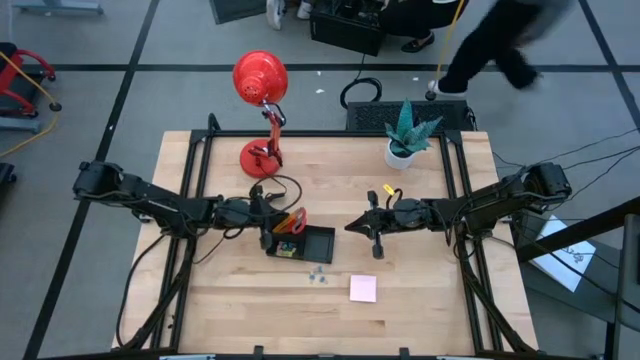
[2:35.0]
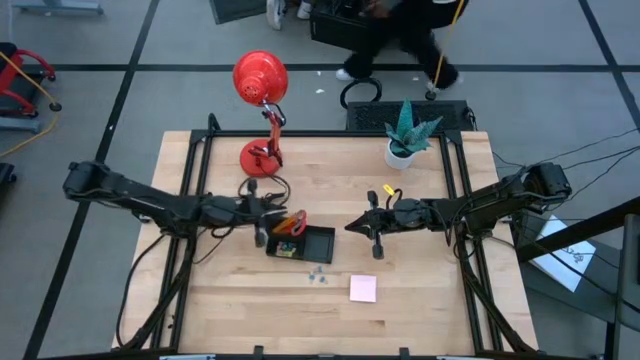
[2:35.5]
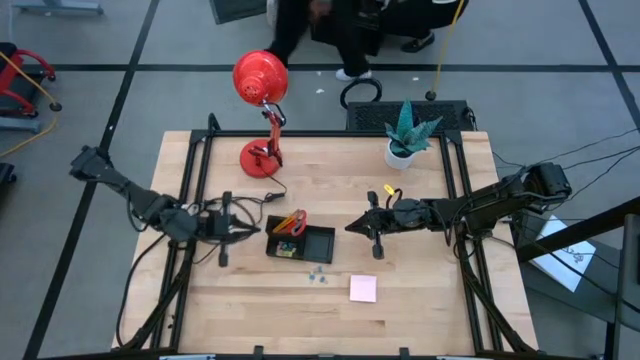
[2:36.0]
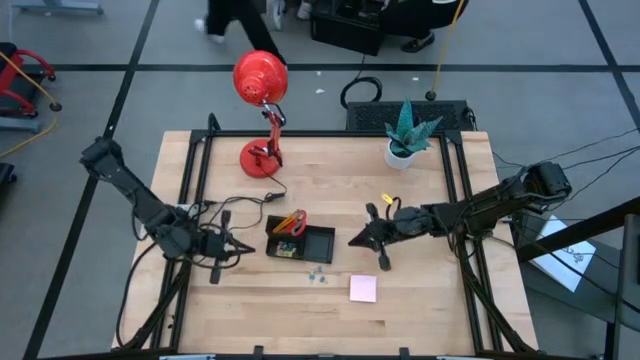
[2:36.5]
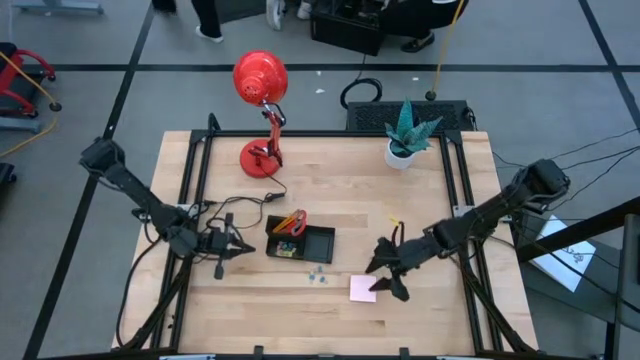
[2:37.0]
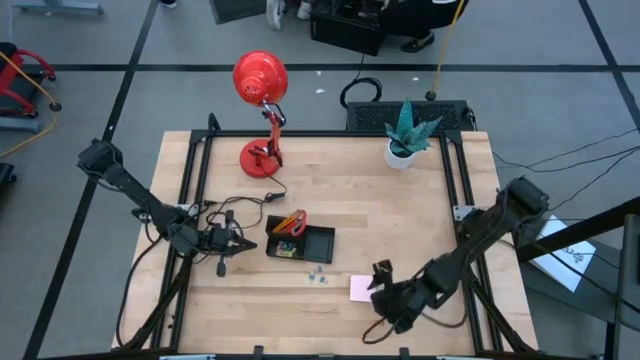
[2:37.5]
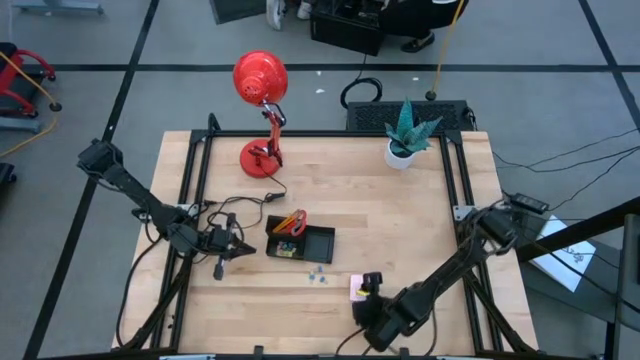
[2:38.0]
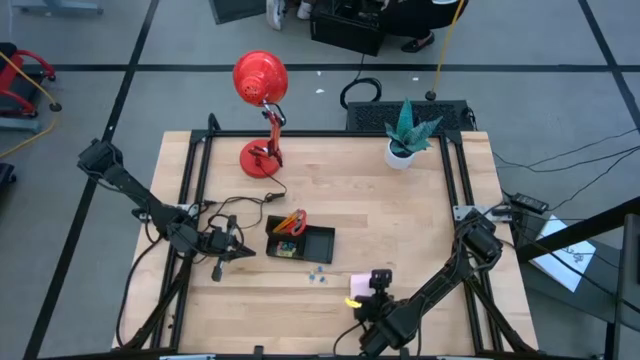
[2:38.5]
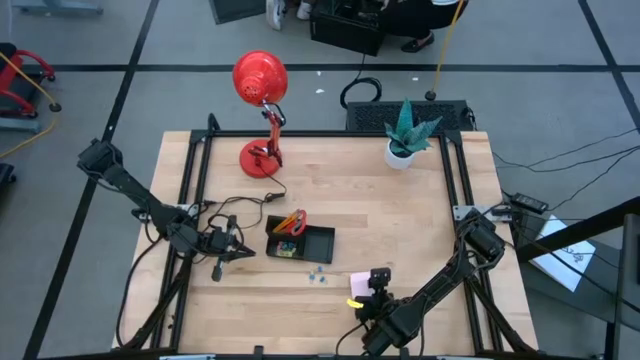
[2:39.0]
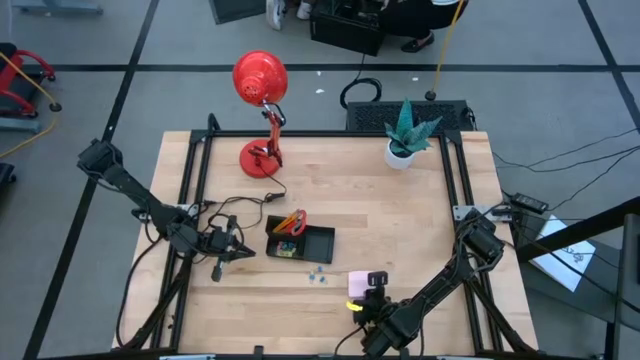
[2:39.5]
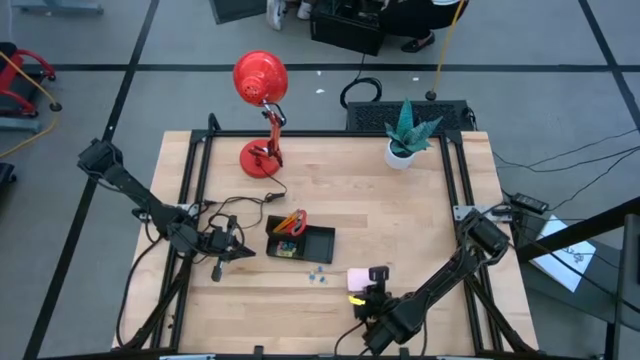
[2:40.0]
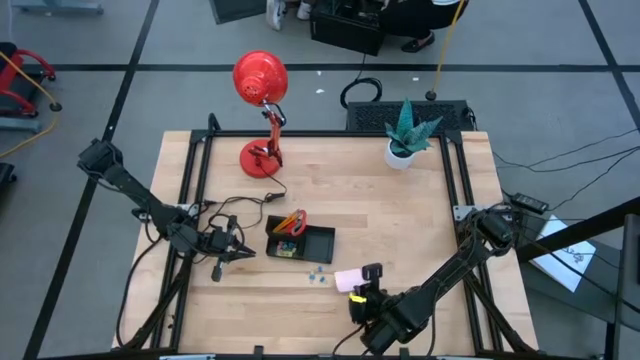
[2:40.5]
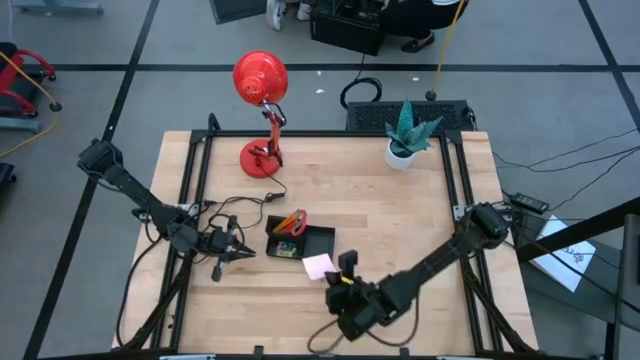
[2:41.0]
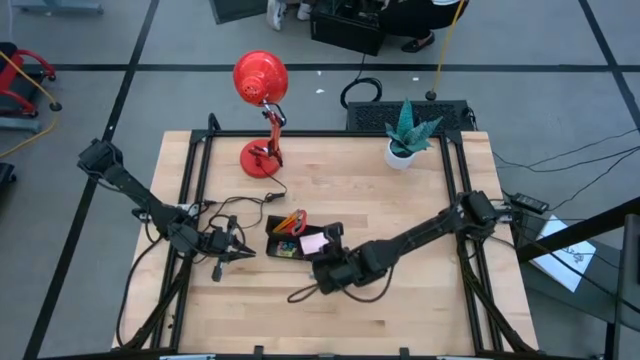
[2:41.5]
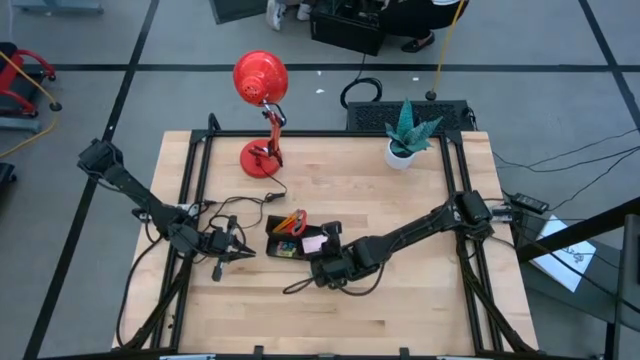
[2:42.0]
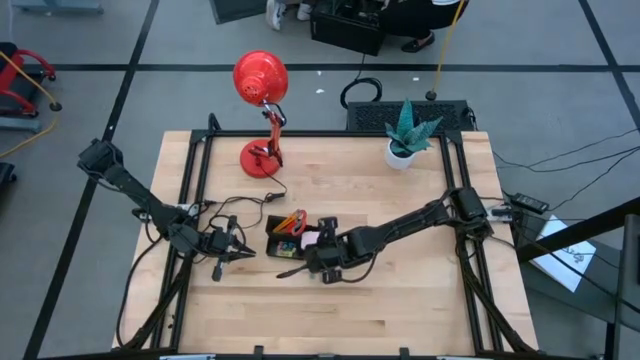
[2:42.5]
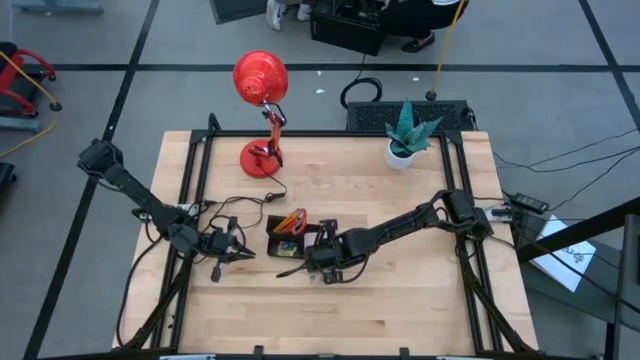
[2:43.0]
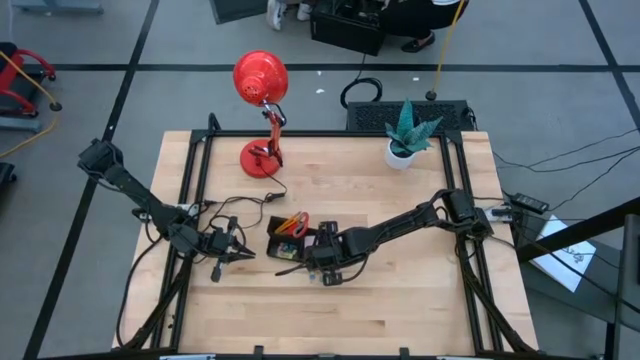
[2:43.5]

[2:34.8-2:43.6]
Task: Pick and place office supplies into organizer
Put the pink sticky note into the desk organizer

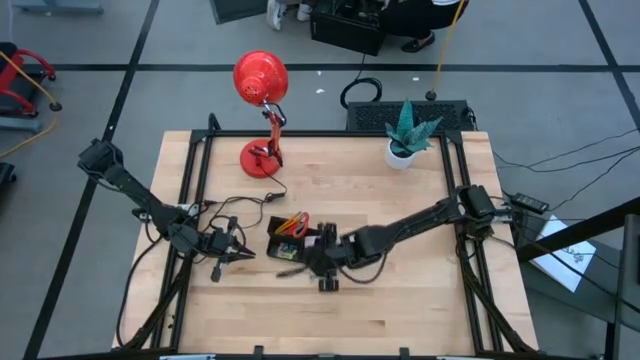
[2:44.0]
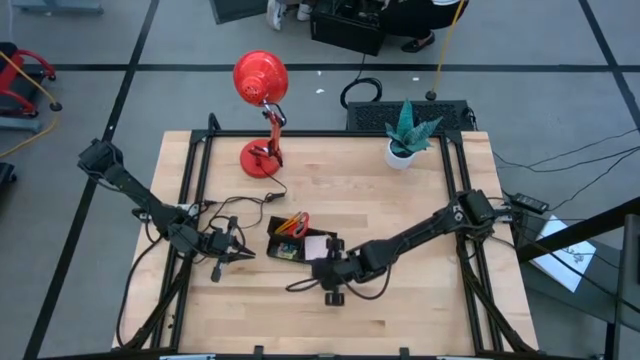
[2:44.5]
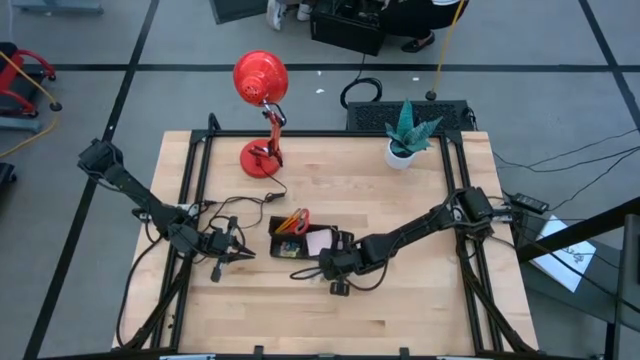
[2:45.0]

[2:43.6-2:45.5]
Adjust the desk organizer

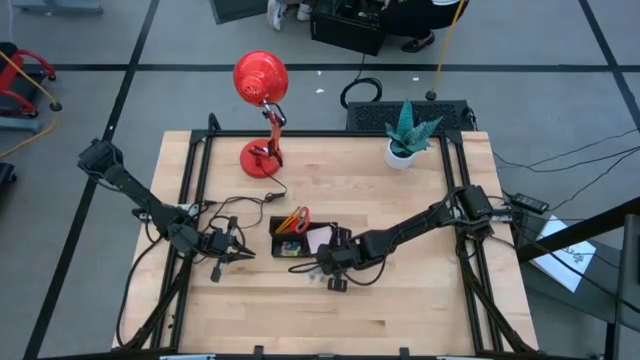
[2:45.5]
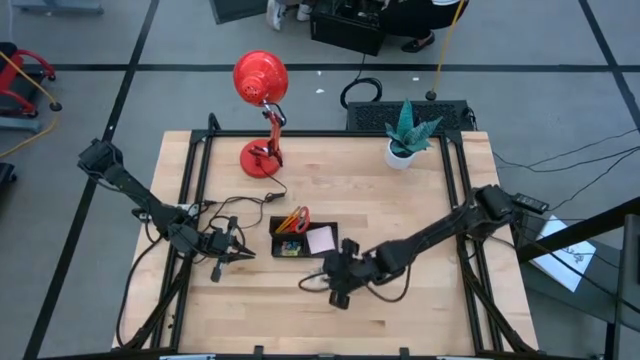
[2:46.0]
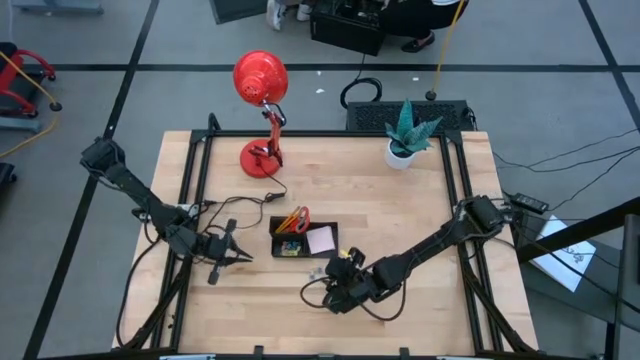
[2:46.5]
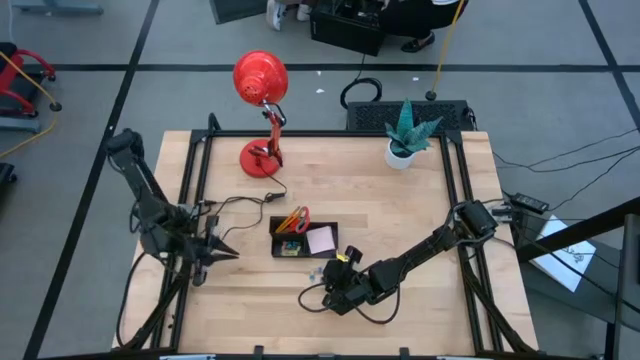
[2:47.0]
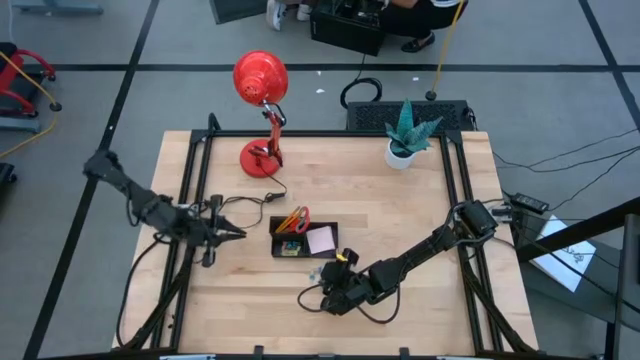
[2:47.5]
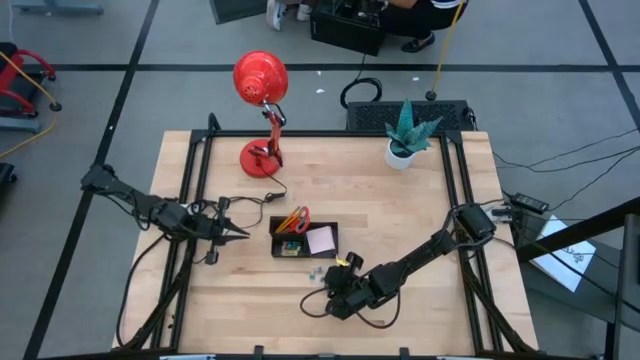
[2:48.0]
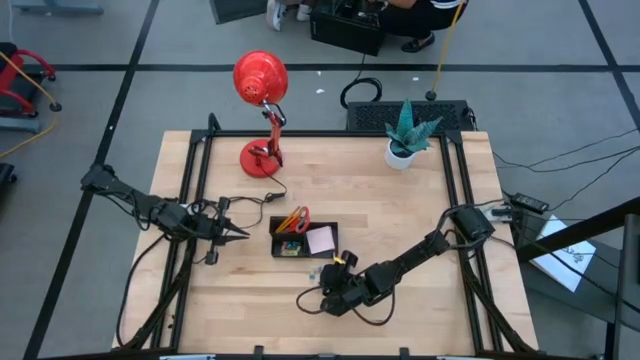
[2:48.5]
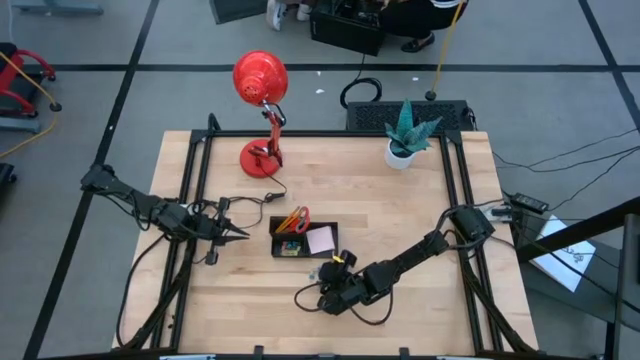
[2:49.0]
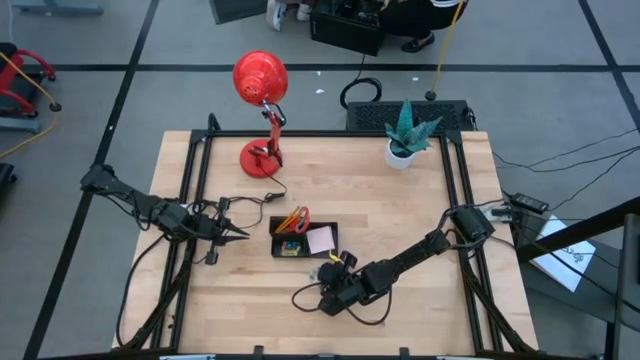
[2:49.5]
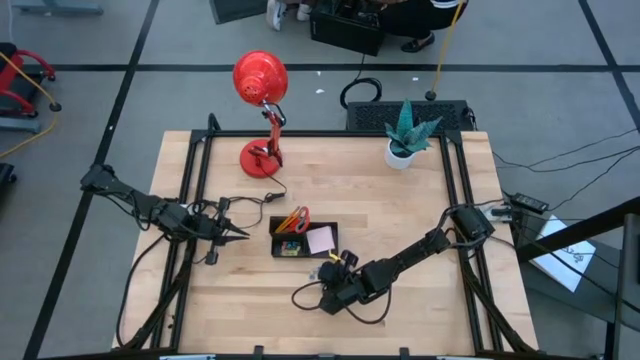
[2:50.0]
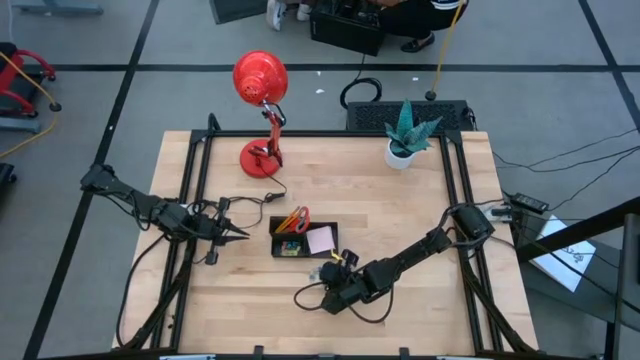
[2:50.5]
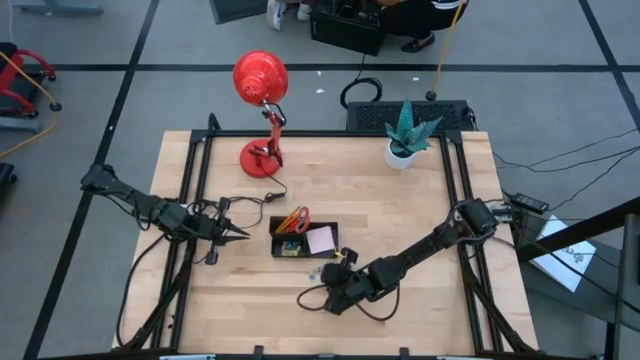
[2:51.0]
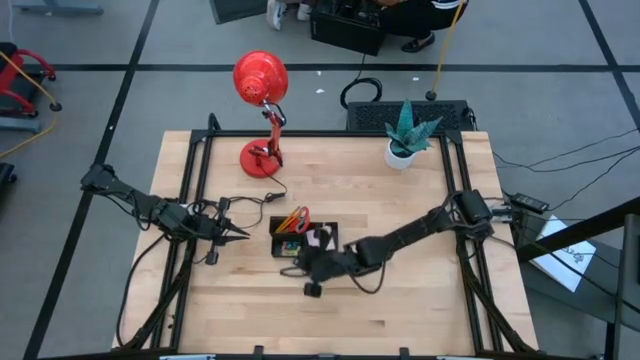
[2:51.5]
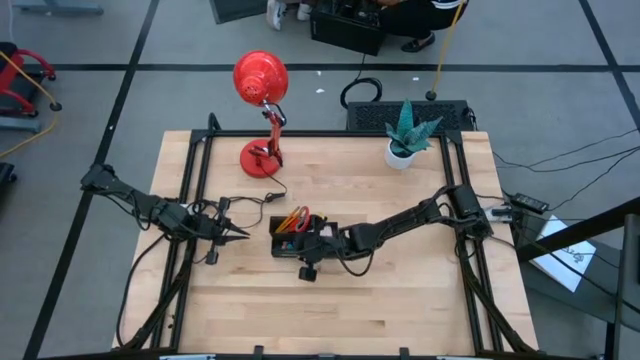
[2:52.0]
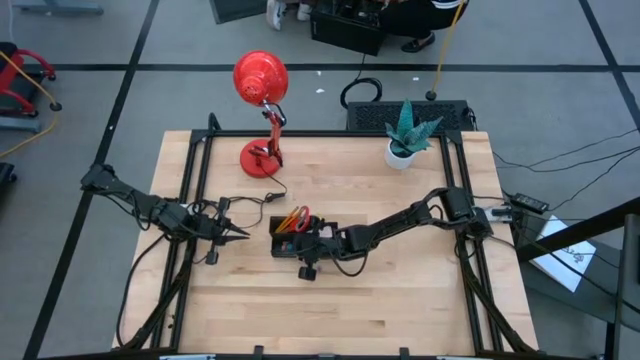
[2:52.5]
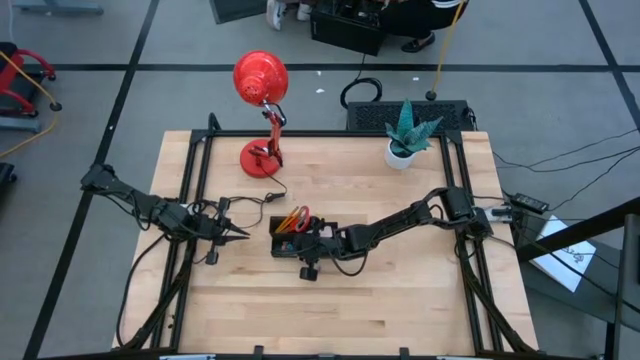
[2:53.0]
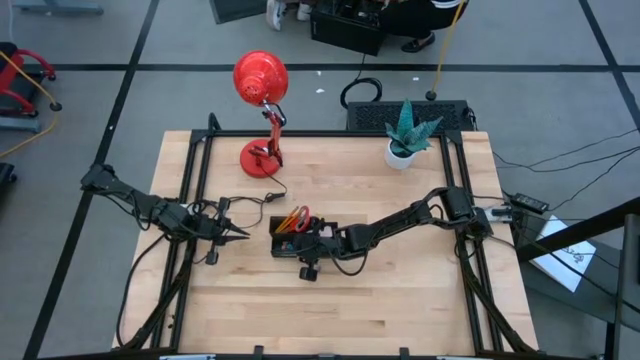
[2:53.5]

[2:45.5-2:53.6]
Put the blue binder clip into the desk organizer

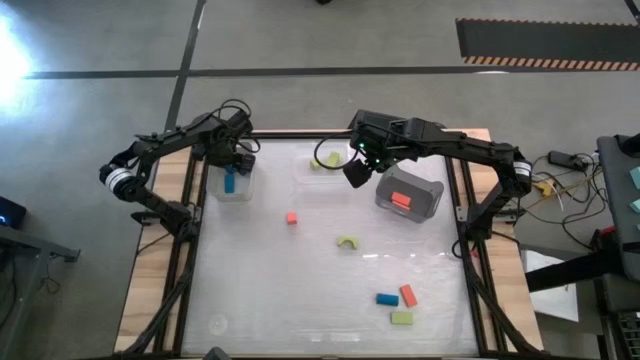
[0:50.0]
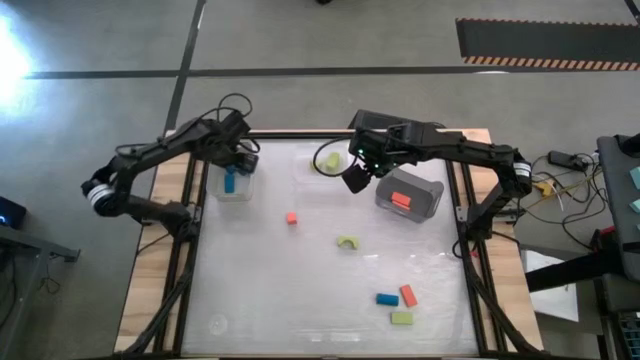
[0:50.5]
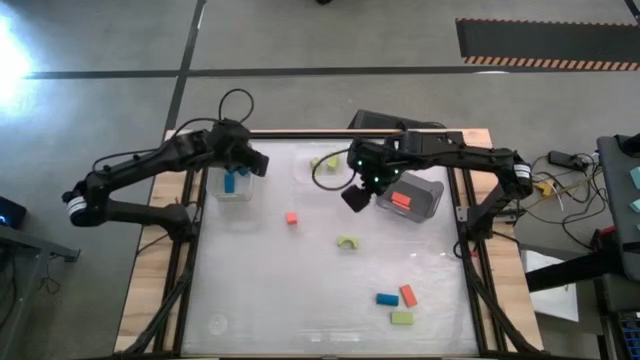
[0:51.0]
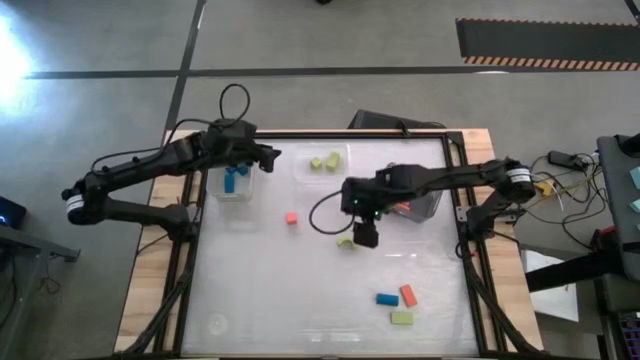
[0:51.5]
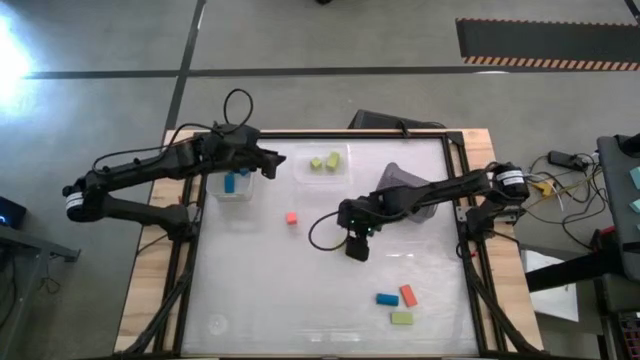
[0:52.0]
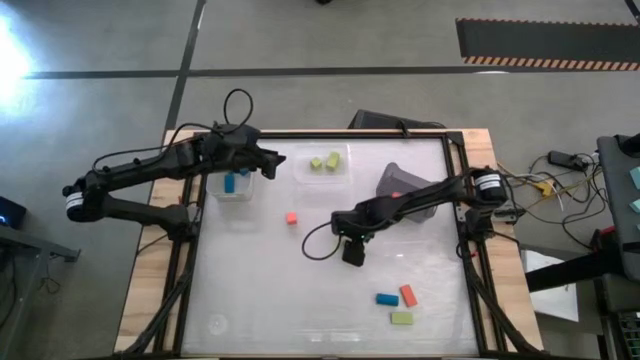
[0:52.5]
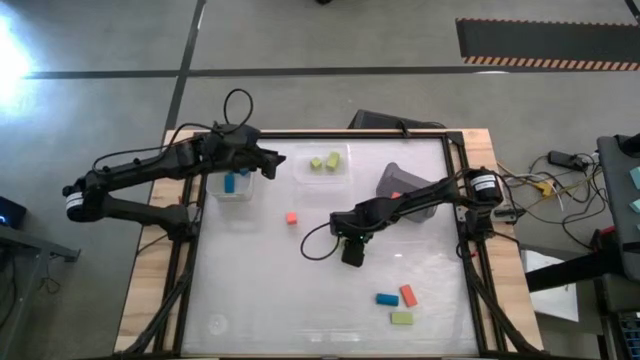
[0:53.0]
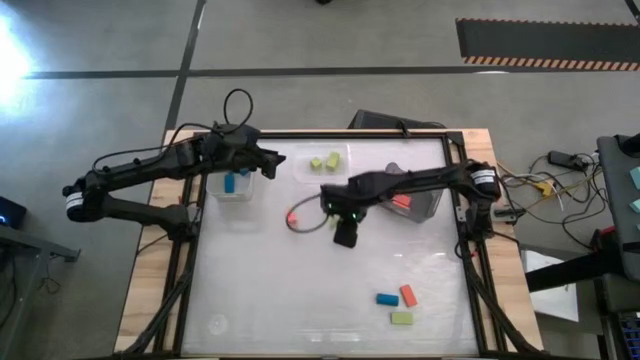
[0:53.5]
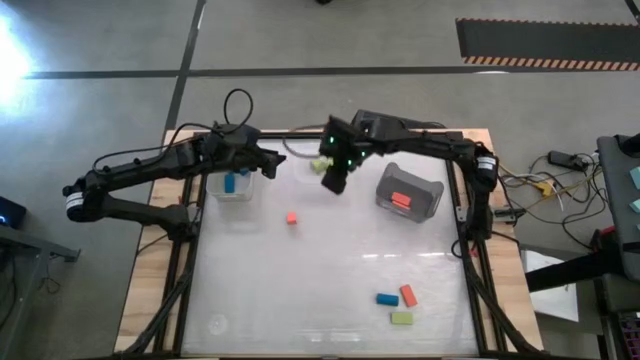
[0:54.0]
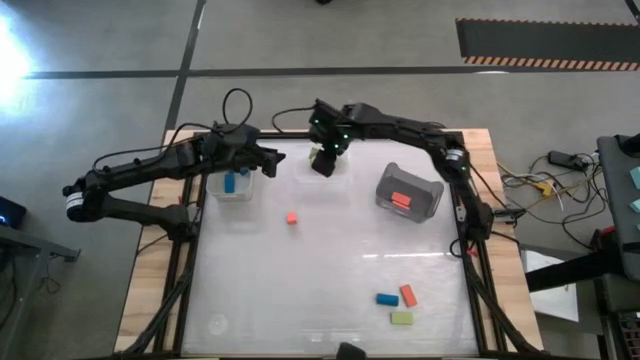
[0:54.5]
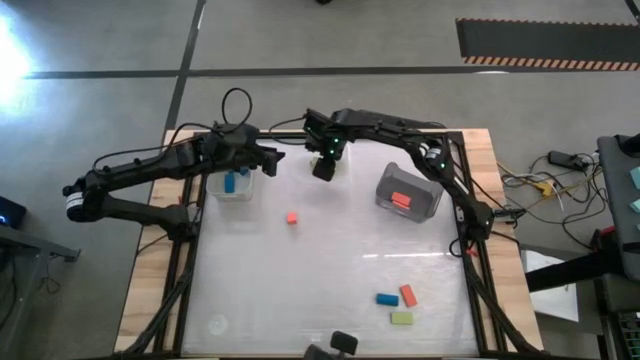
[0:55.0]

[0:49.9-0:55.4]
Task: Sort & place blocks by color
Put the green block into the transparent bin
